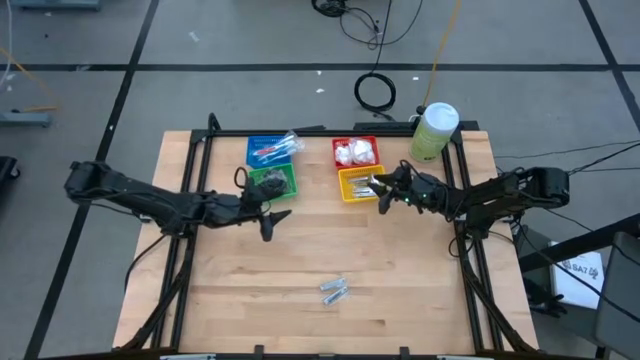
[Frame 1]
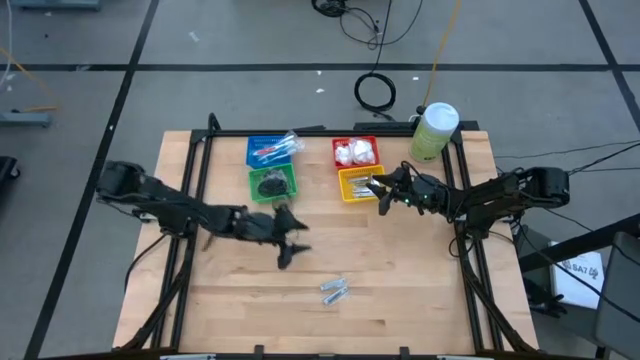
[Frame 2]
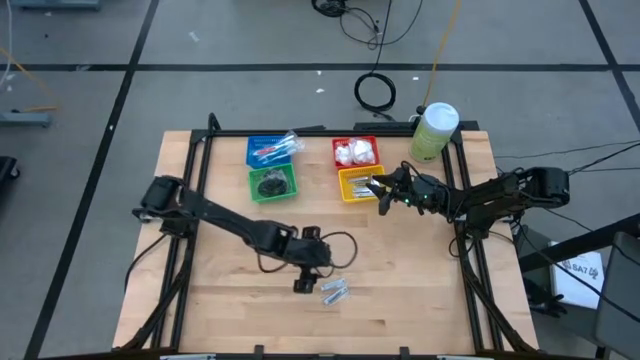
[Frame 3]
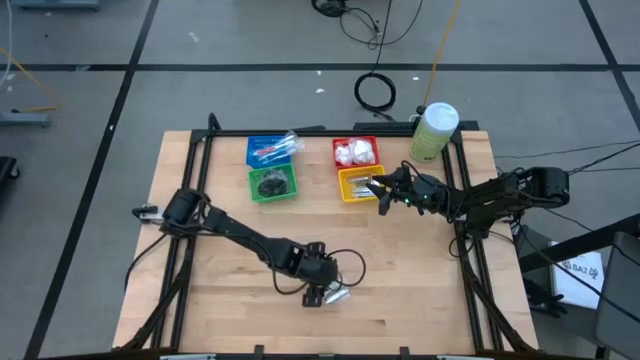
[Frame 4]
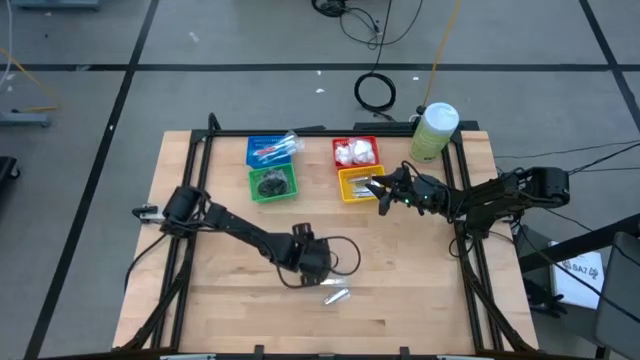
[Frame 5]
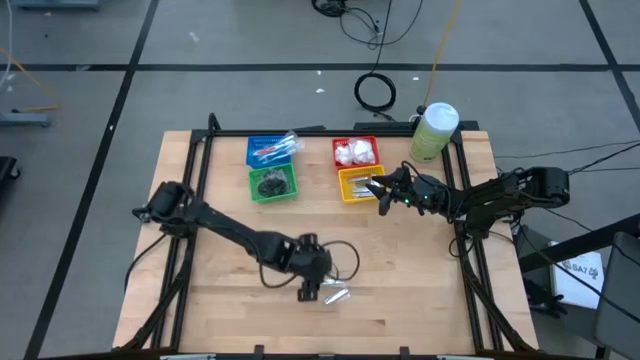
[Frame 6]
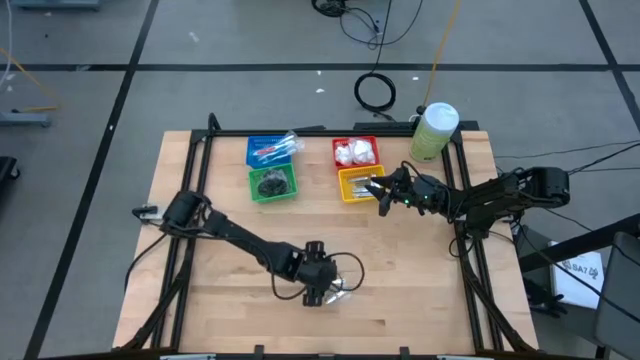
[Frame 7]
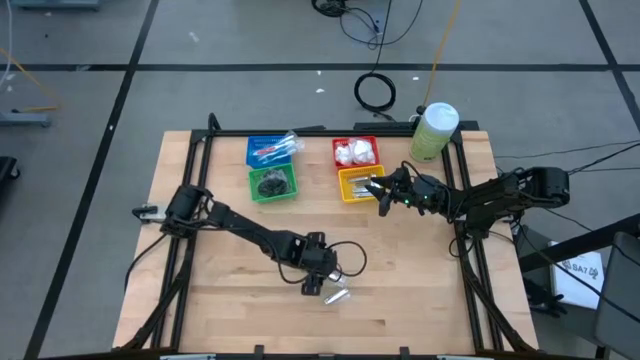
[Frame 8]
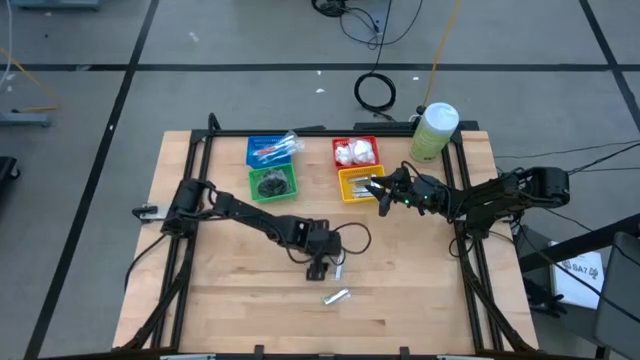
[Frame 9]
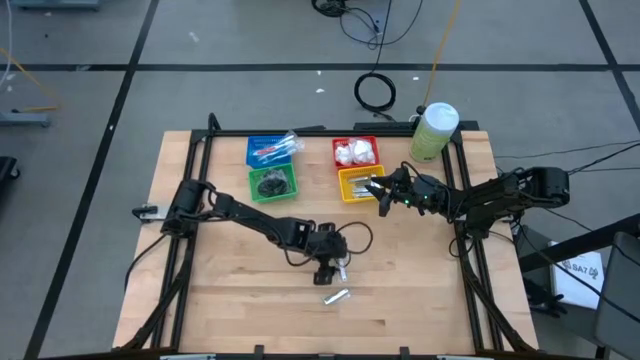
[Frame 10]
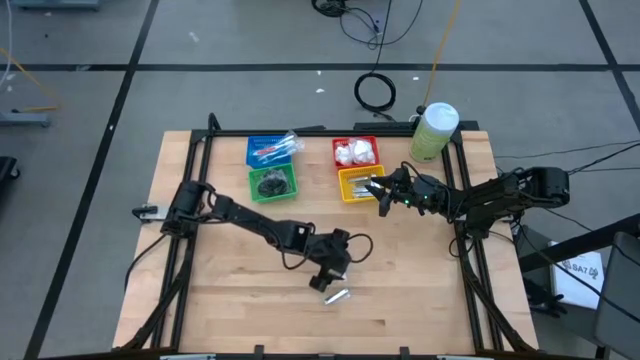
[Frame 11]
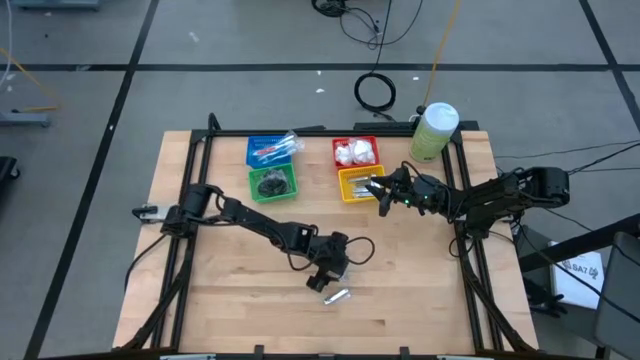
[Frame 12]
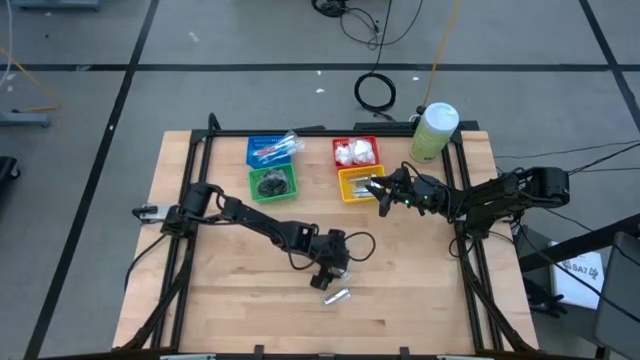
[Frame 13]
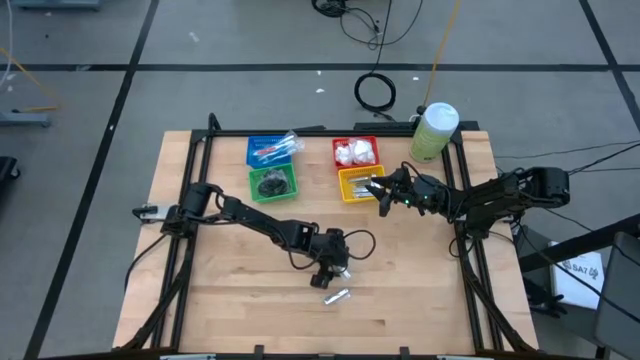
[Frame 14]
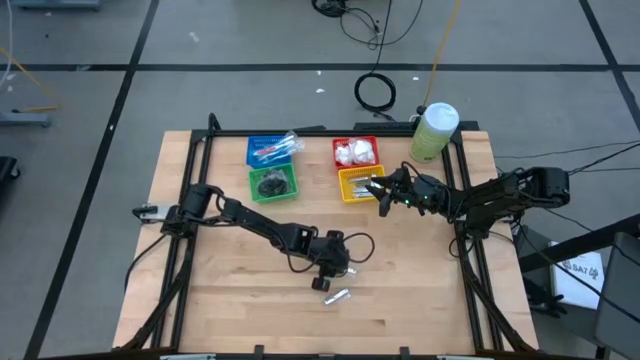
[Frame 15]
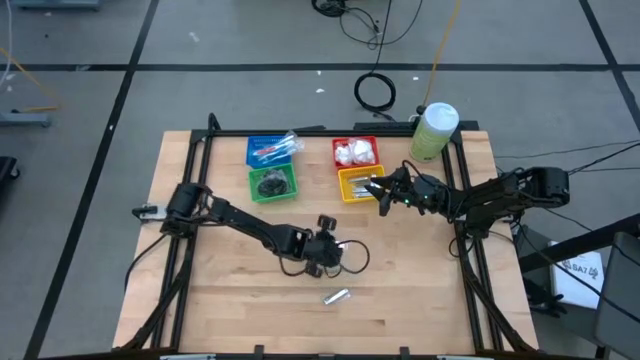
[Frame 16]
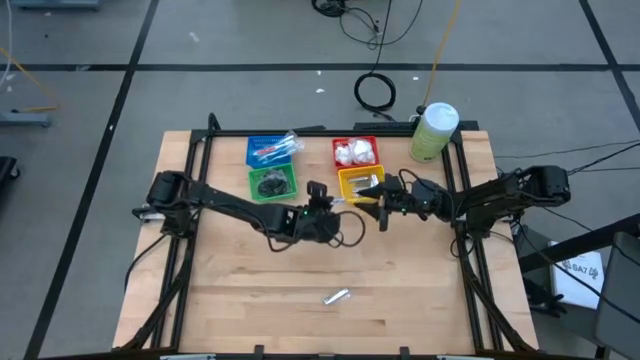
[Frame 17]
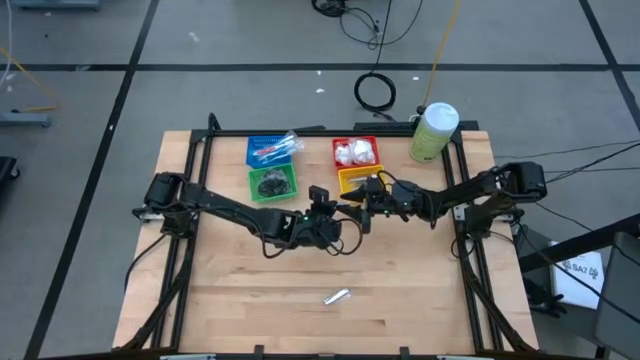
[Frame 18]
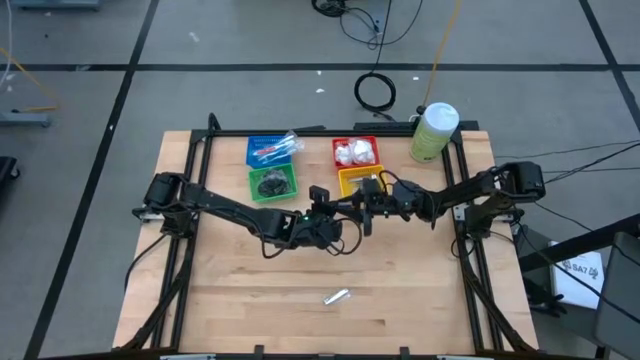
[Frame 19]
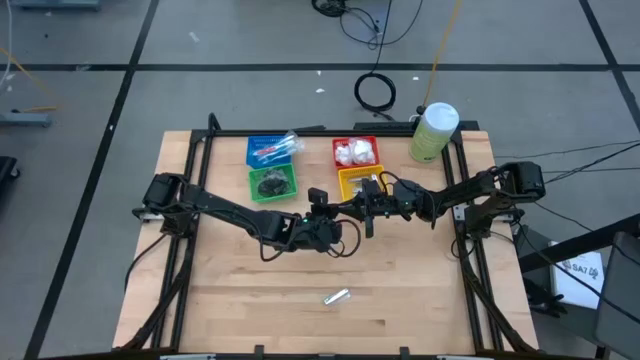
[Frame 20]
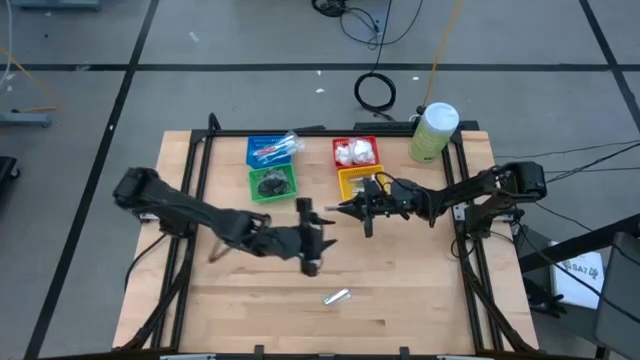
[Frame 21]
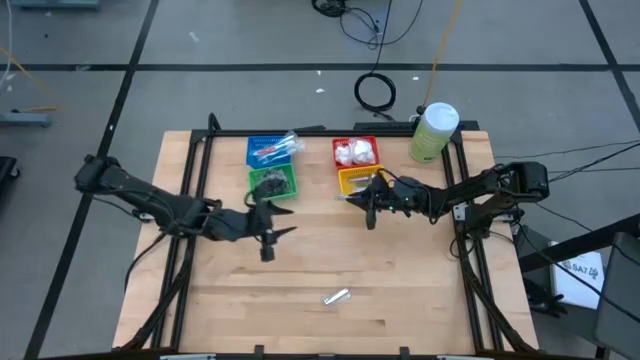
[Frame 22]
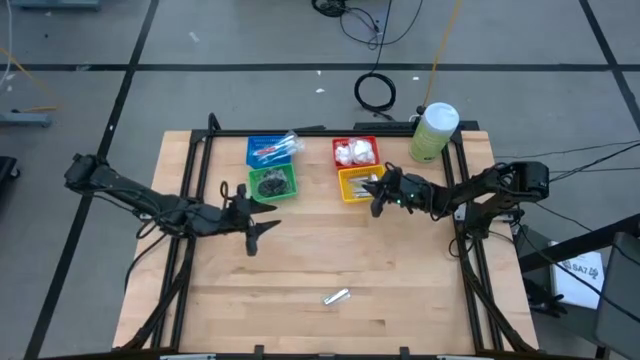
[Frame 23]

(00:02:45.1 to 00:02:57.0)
Task: Pick & Place Travel size toiletries
Put the nail cutter into the yellow bin

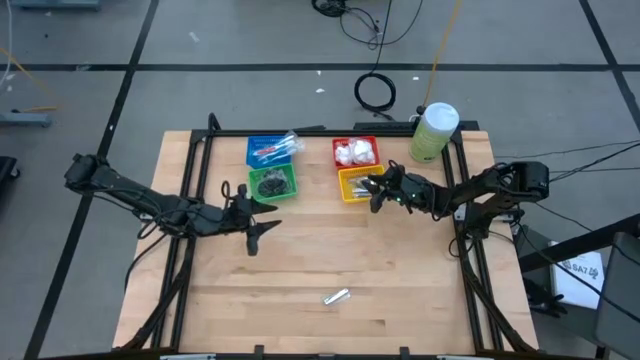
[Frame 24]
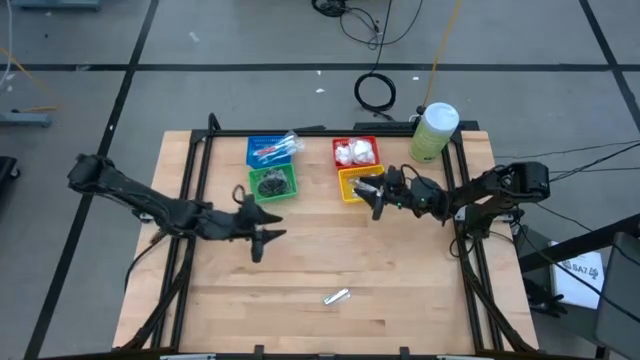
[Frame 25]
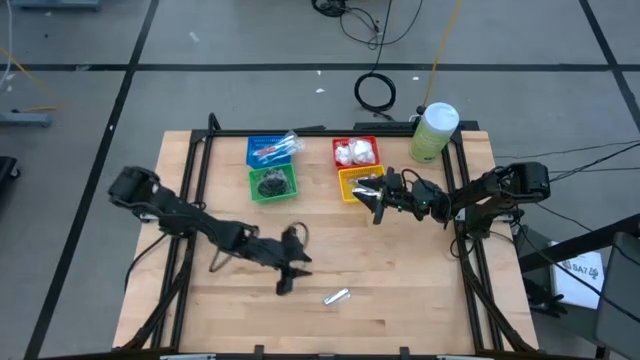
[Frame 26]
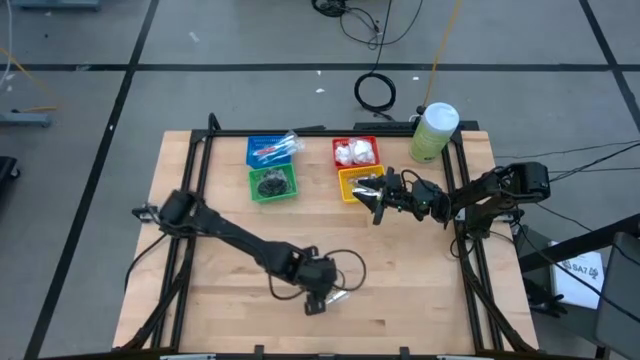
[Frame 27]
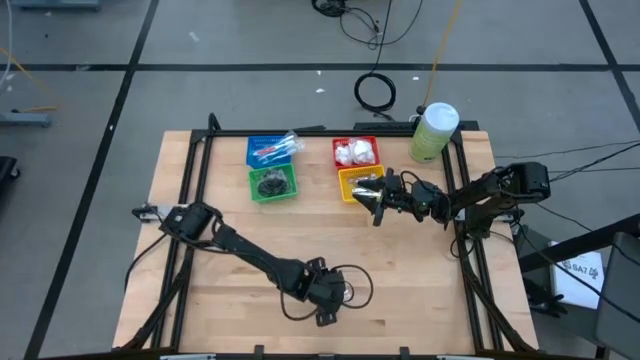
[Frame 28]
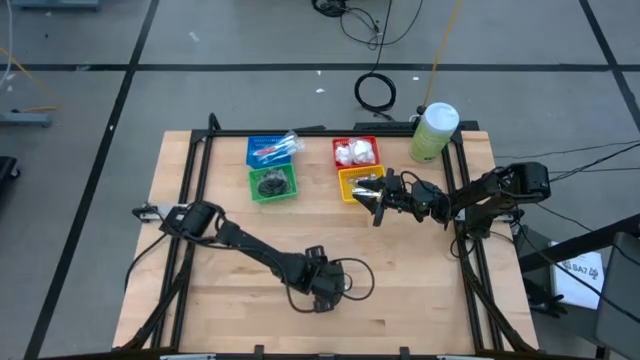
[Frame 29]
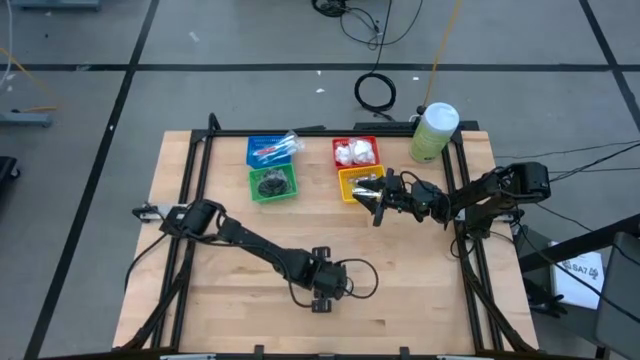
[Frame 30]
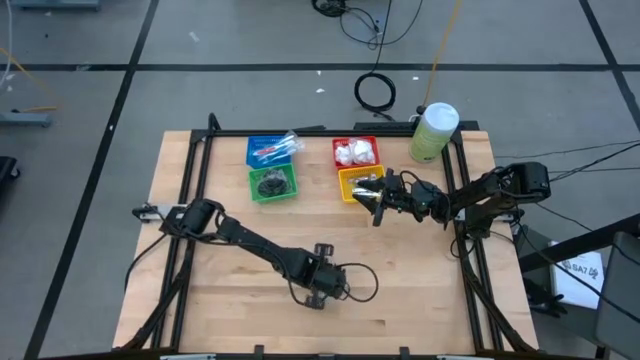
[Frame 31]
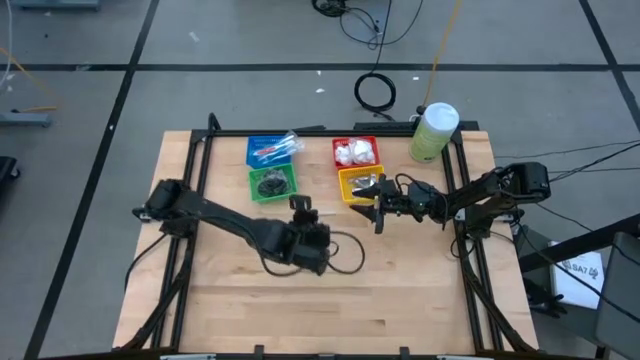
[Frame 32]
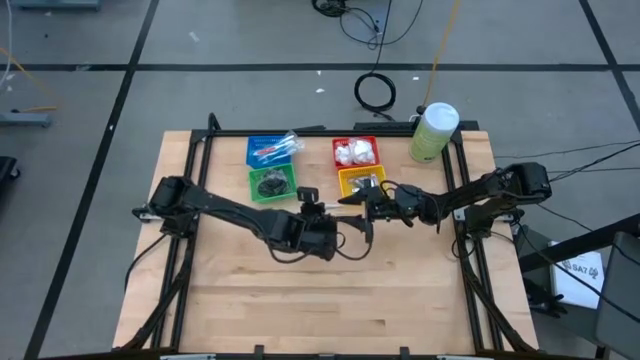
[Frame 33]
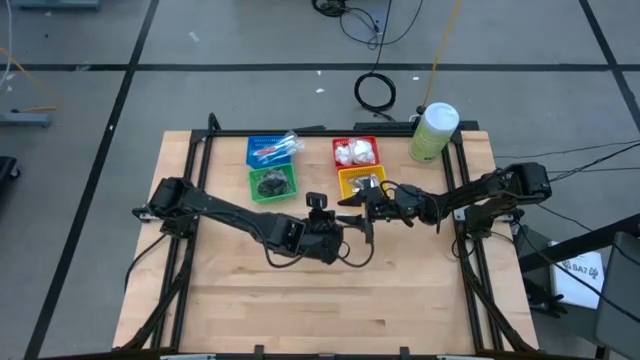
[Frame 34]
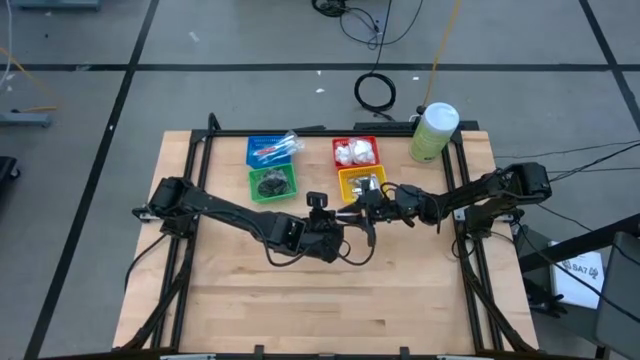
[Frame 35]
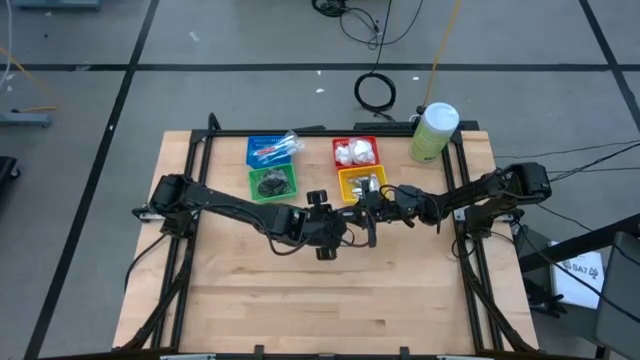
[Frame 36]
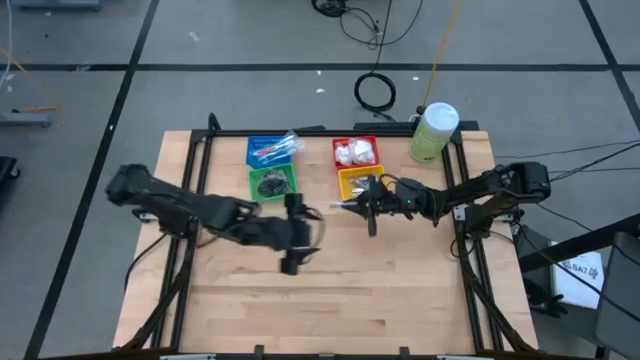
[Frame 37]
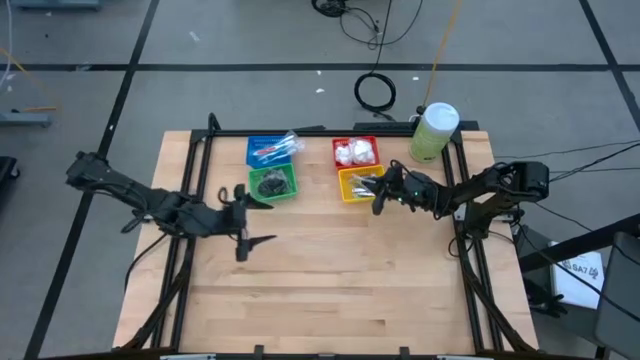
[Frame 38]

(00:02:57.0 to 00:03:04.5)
Put the nail cutter into the yellow bin

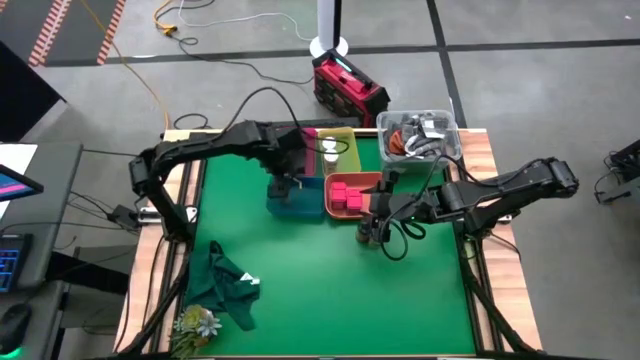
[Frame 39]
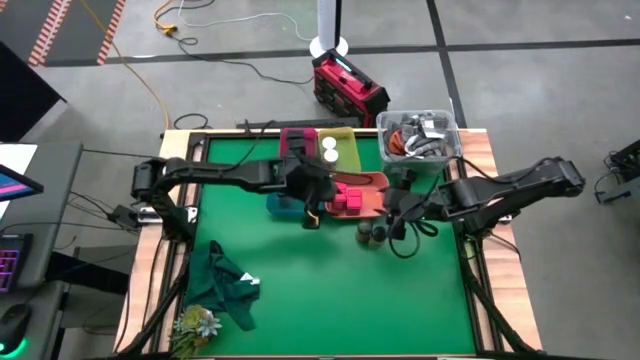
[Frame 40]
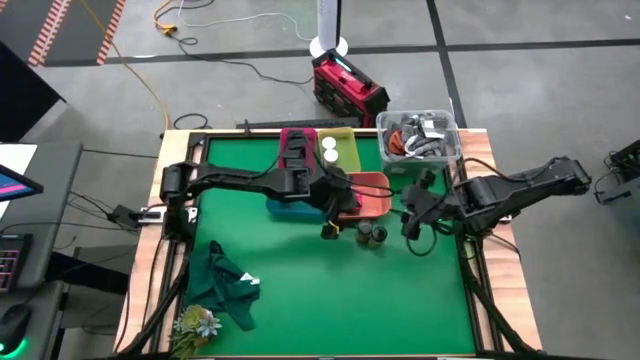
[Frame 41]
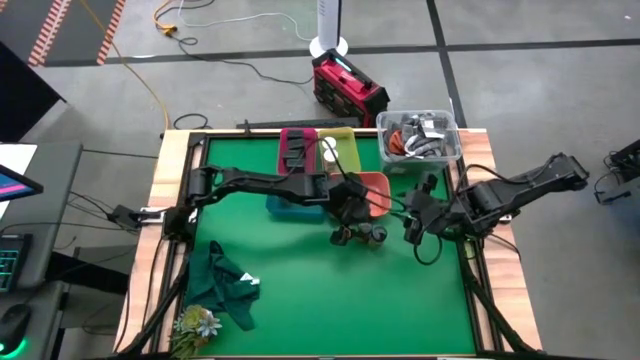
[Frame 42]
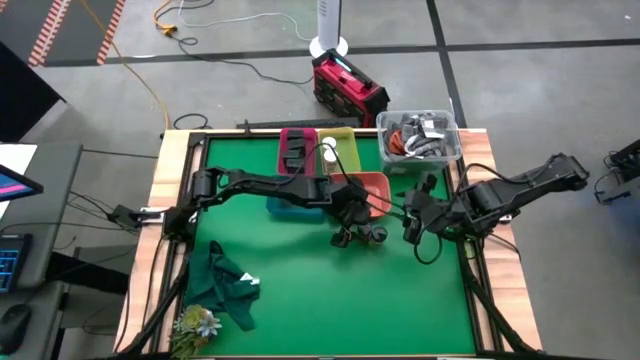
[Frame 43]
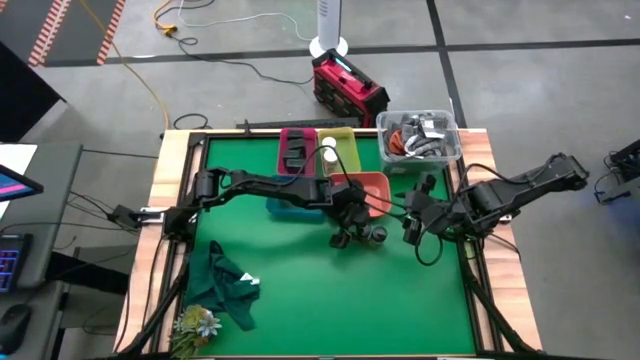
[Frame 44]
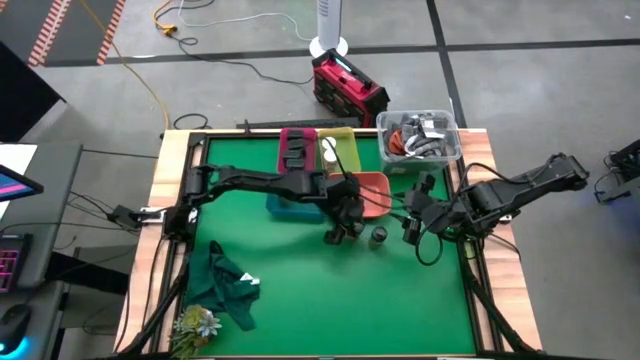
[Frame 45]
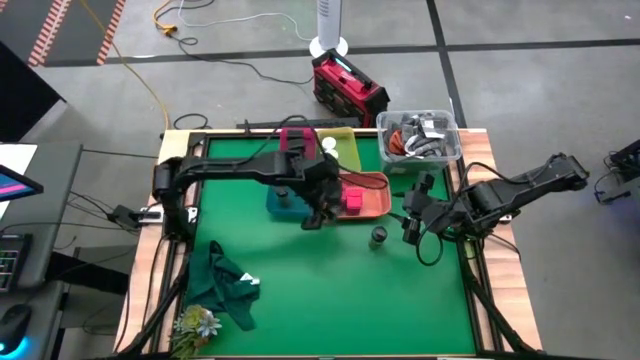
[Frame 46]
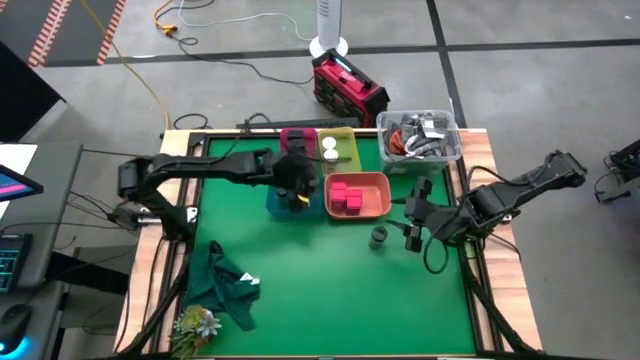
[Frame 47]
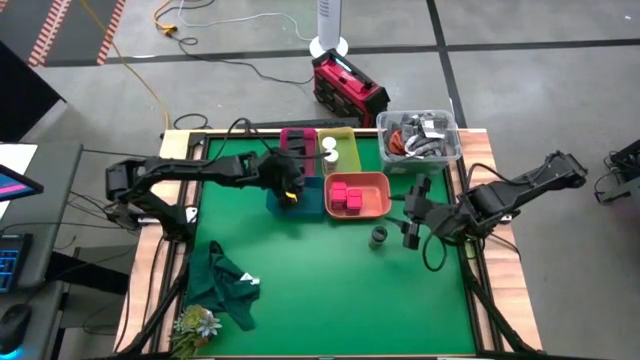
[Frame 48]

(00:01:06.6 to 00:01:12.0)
Task: Sort spices by type
Put the left brown seasoning bottle into the blue bin
